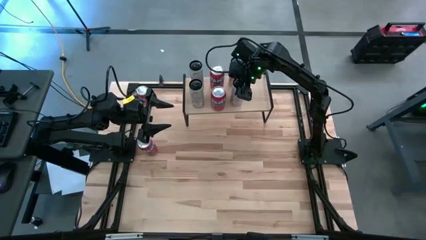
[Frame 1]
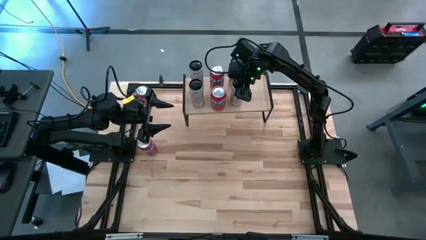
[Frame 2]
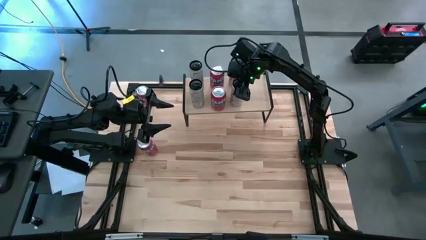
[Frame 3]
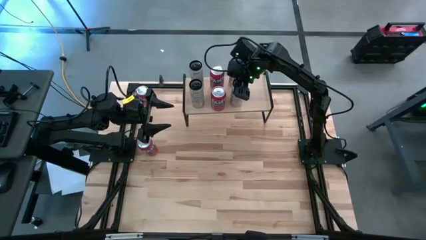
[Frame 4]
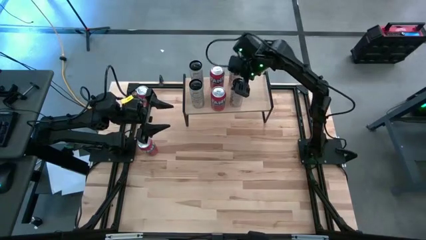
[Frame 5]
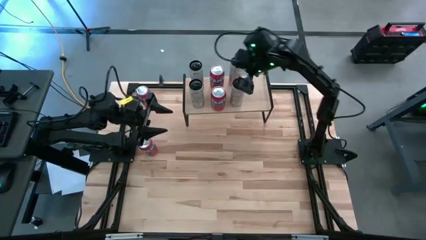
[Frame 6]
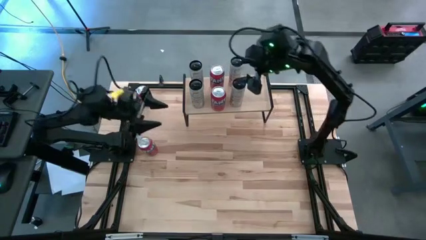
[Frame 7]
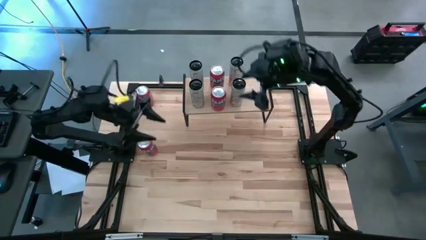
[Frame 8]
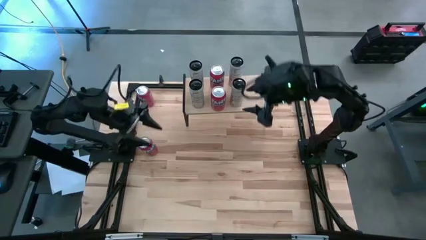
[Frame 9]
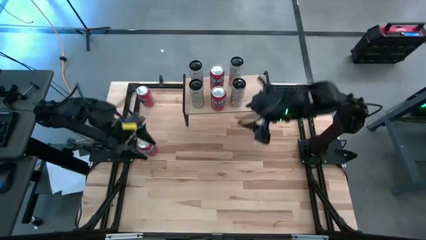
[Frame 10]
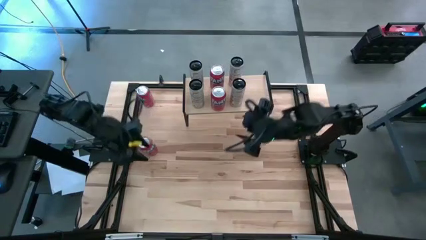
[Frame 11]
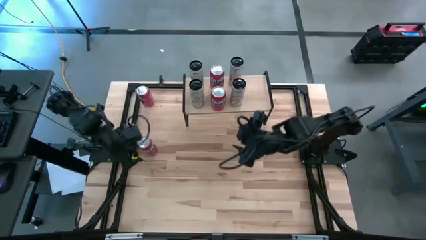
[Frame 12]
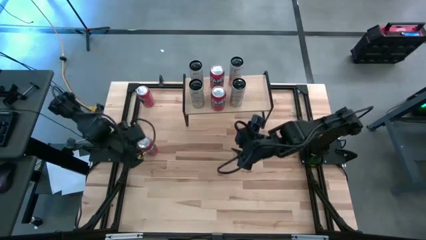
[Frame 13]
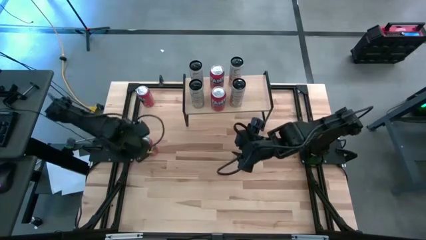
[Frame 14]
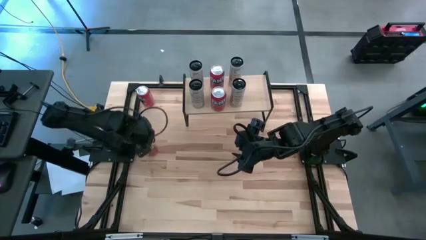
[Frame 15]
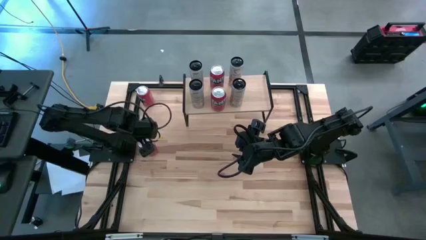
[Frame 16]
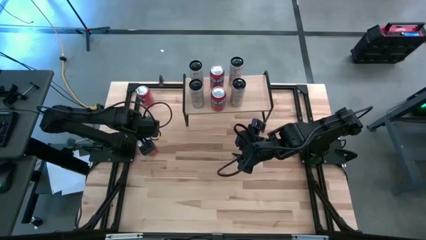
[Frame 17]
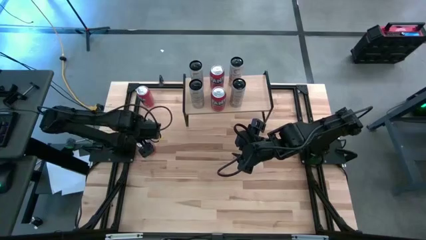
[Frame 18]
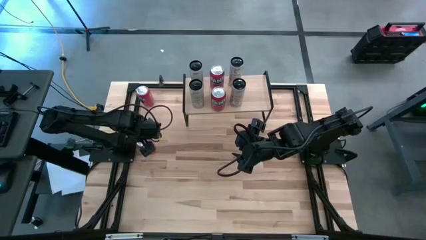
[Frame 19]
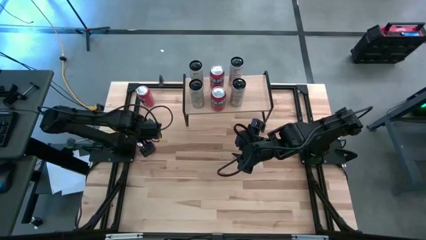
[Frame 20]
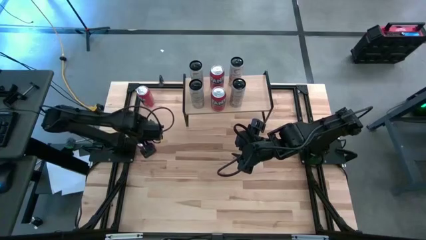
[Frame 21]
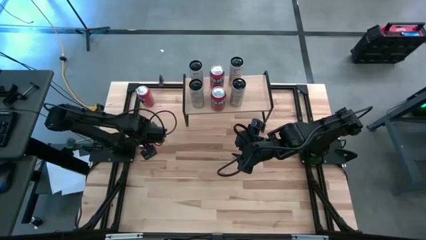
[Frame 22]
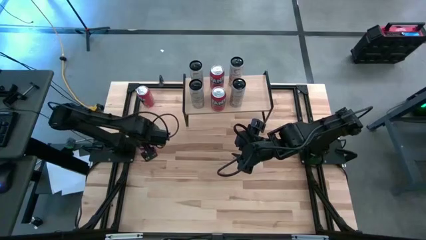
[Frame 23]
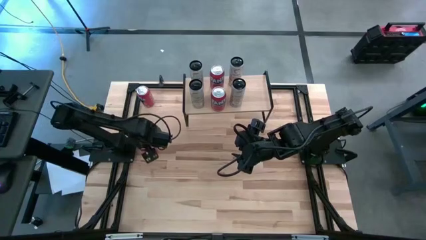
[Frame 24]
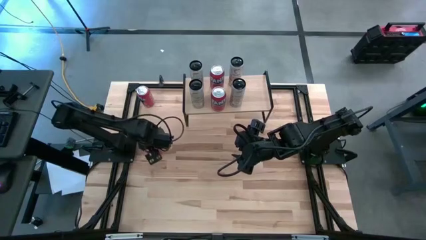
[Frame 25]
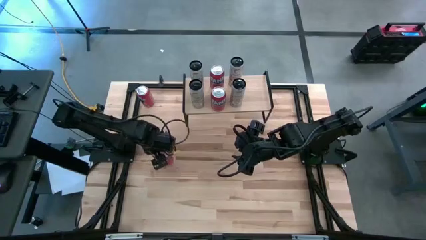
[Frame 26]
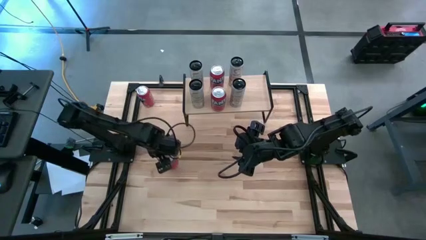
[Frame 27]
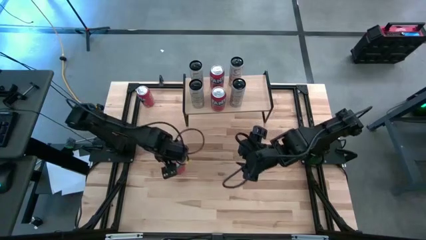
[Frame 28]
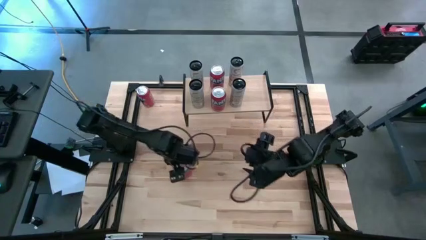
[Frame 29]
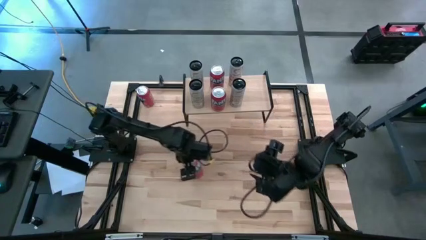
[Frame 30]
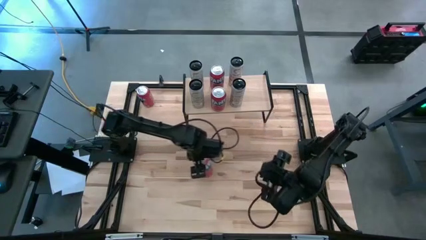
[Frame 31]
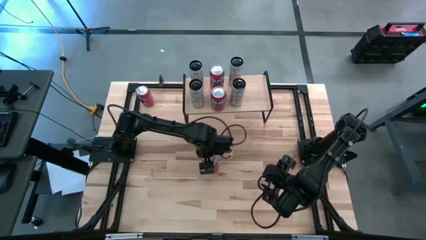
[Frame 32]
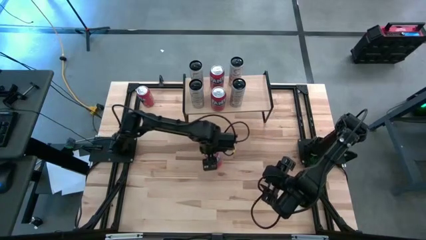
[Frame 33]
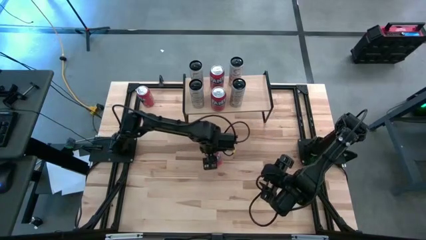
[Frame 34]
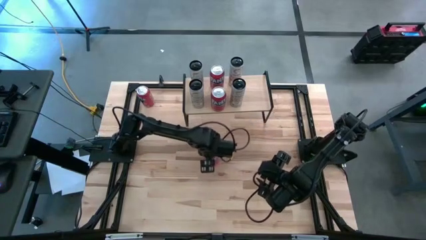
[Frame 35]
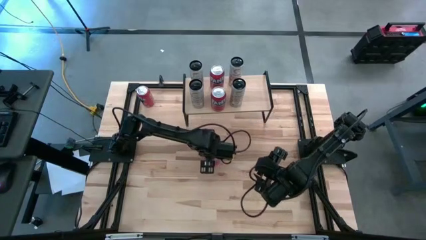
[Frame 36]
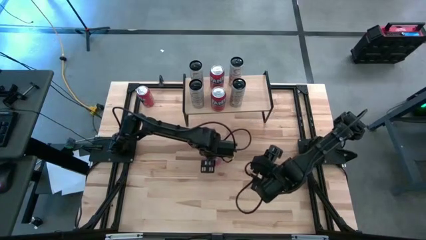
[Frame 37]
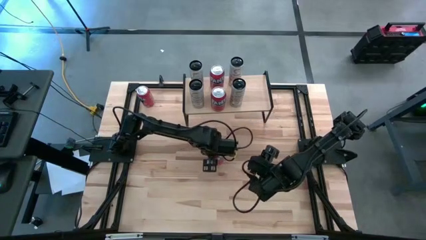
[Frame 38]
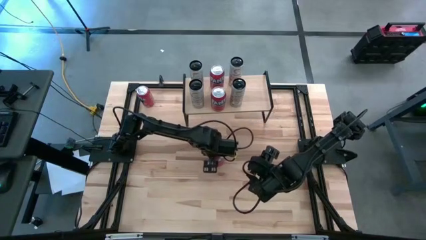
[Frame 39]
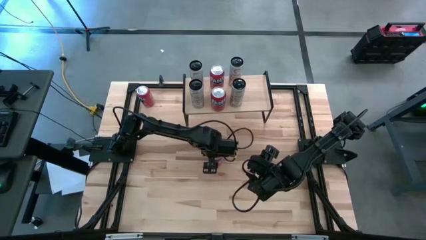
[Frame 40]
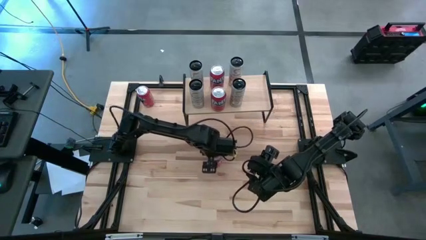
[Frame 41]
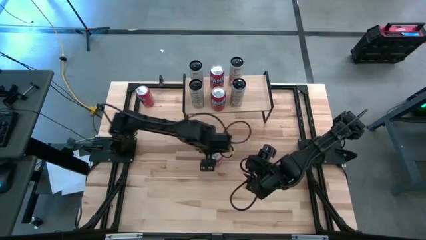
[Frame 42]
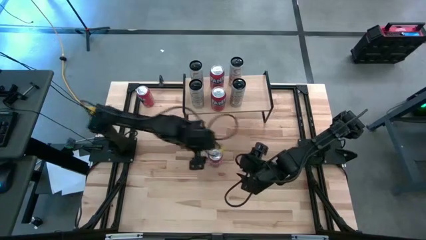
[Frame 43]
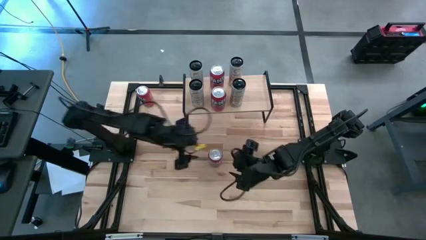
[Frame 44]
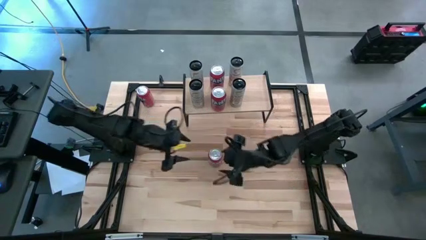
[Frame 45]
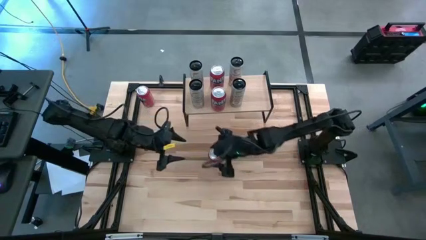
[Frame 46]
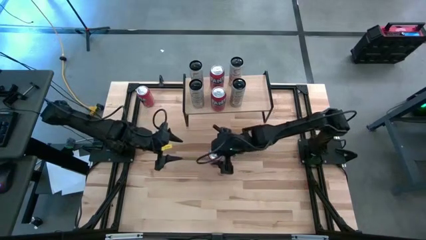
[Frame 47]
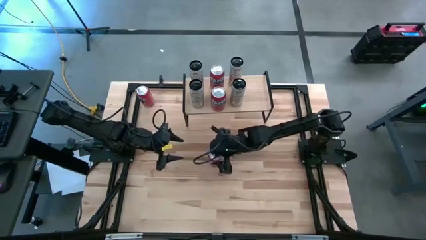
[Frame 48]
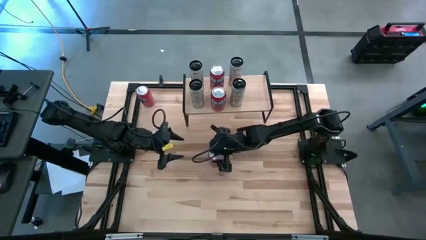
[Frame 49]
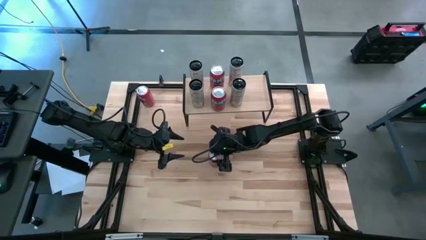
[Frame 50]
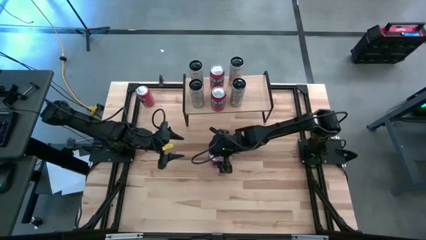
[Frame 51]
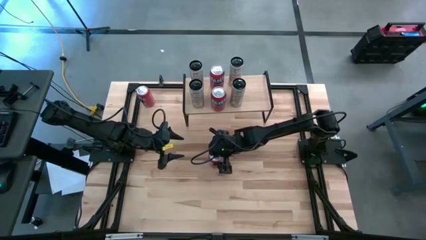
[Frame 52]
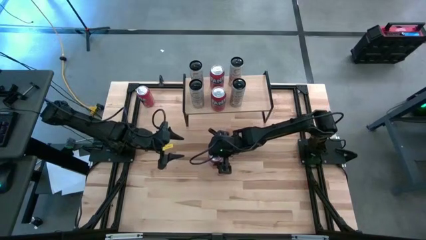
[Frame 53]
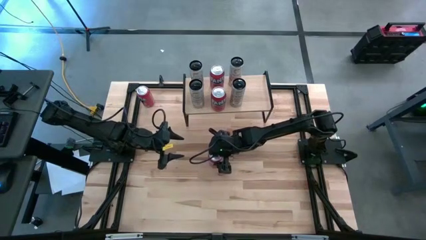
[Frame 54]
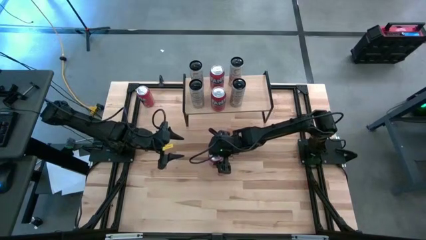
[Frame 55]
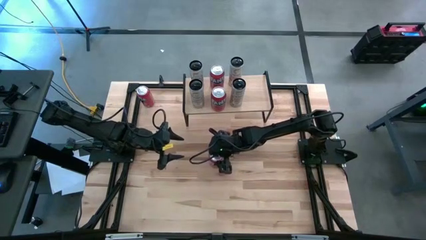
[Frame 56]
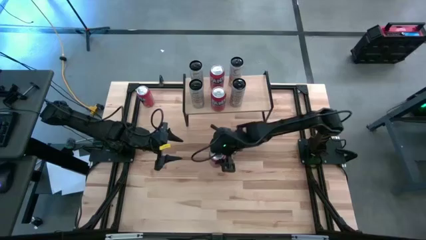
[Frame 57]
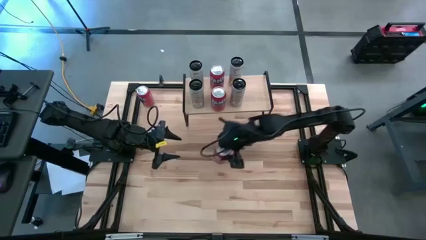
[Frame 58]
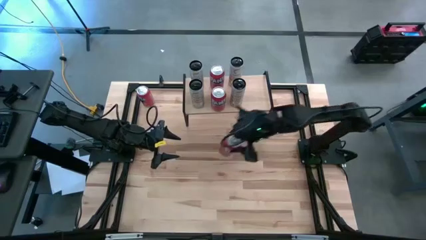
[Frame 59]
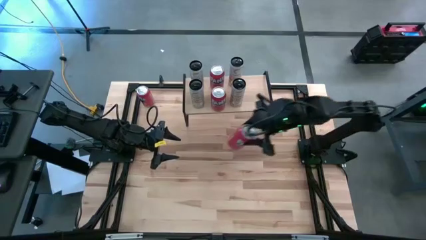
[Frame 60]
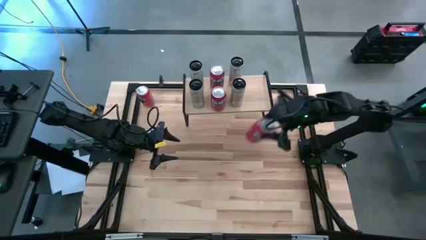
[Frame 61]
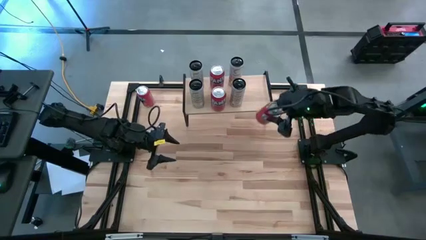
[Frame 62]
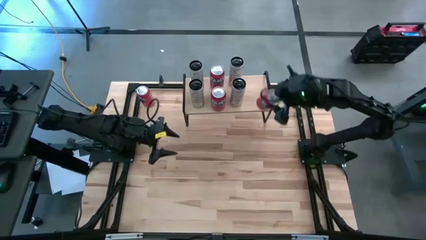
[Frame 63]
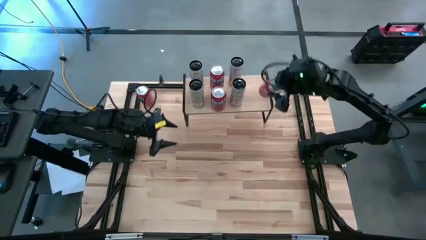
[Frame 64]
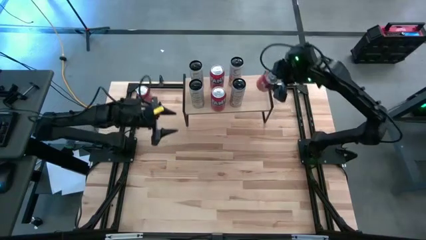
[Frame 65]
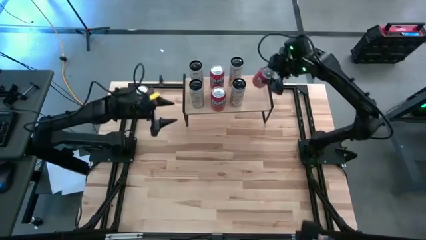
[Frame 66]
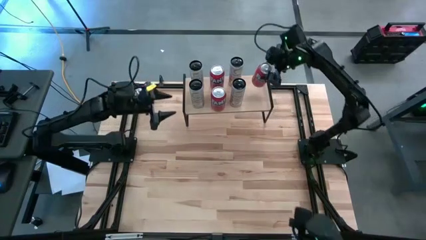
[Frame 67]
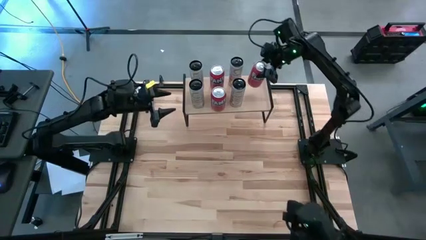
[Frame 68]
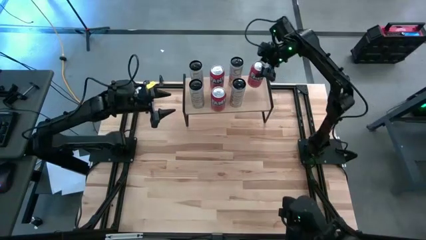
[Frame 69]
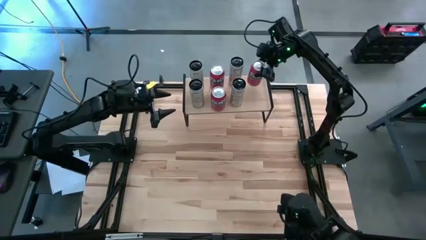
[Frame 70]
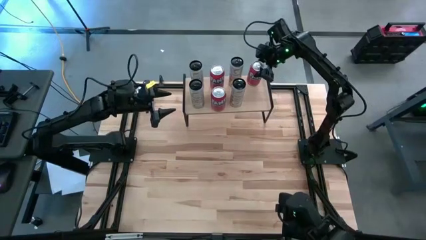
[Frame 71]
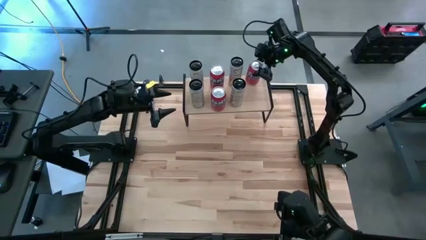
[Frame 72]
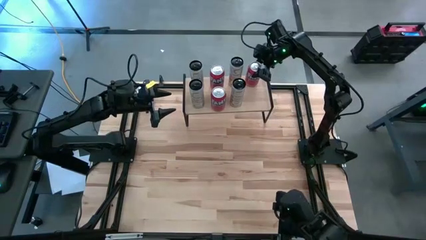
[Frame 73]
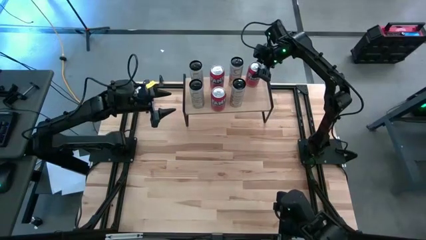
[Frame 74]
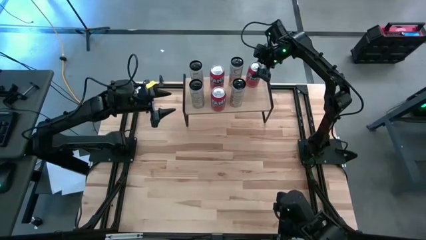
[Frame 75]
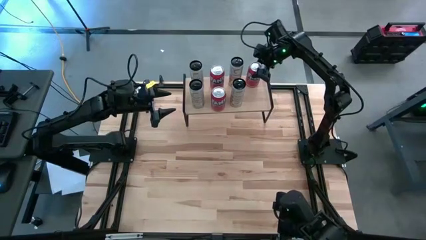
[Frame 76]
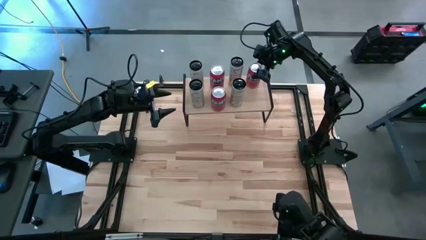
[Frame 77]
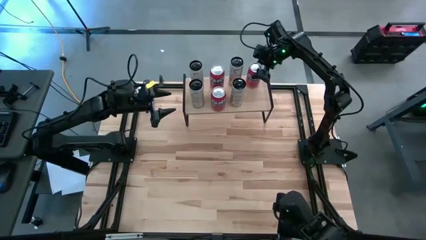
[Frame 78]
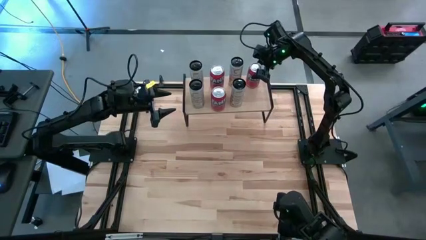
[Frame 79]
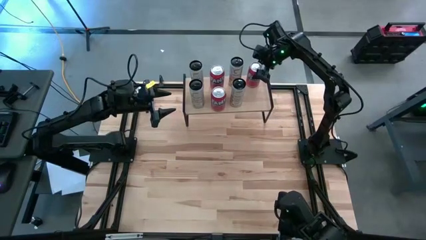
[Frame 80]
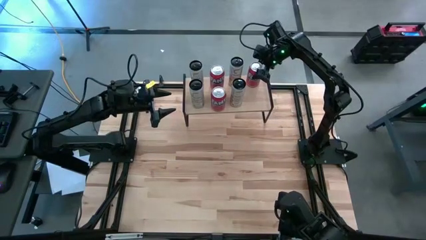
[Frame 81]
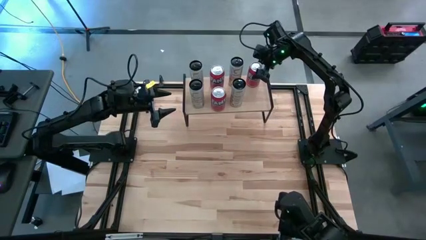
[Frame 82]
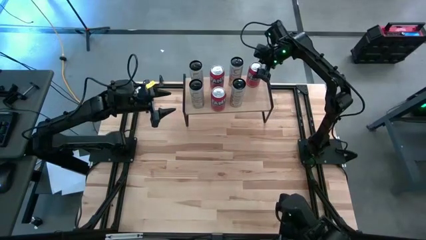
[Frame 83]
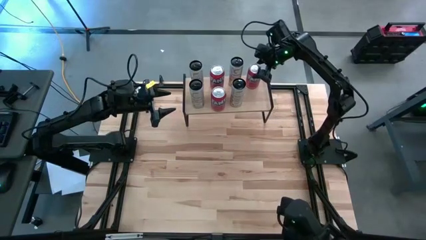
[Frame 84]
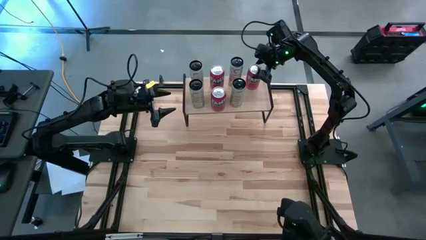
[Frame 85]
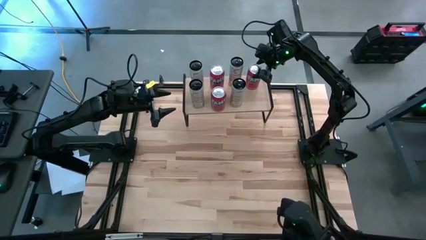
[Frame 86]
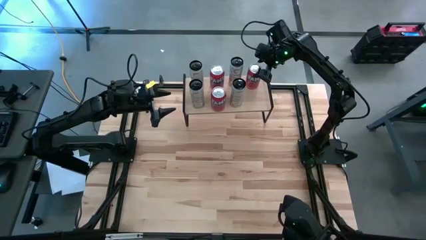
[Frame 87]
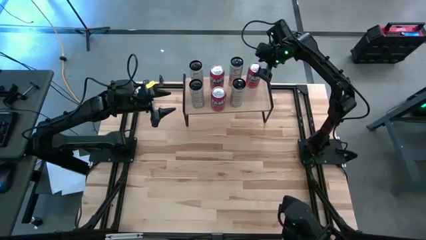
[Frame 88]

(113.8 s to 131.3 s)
Task: Place canned beverage on shelf
Put the red soda can on the shelf
